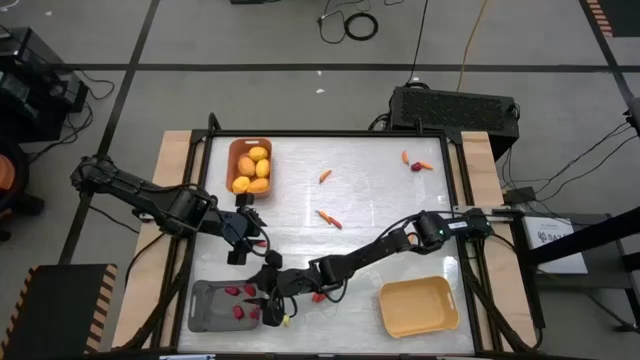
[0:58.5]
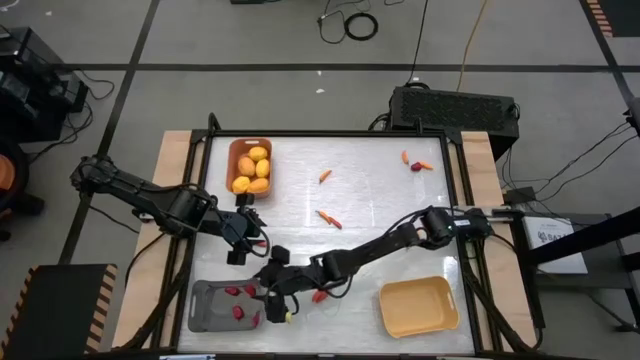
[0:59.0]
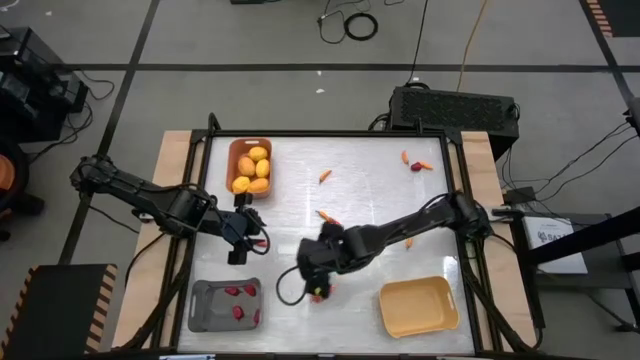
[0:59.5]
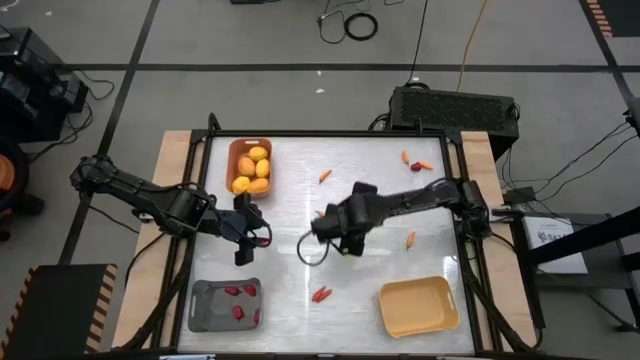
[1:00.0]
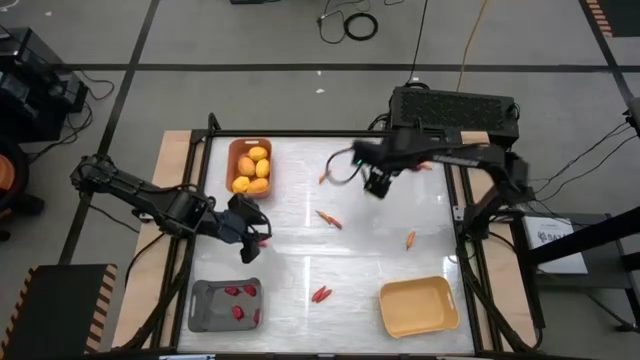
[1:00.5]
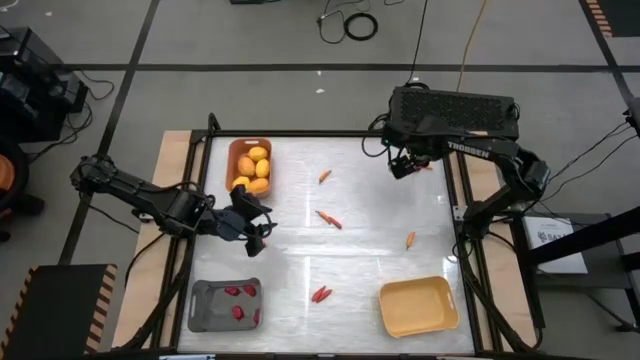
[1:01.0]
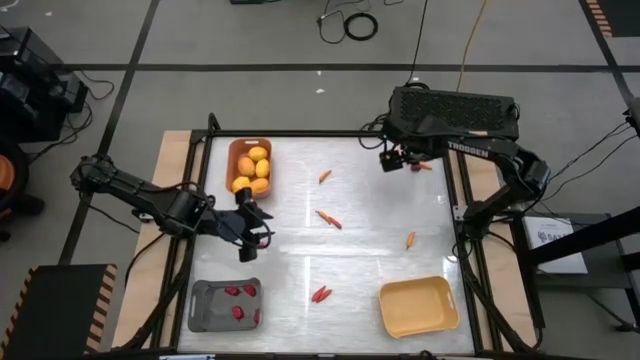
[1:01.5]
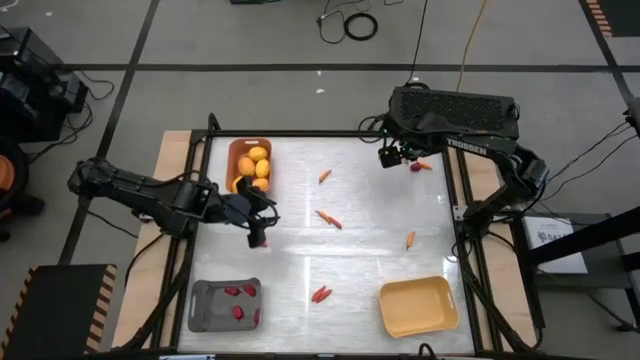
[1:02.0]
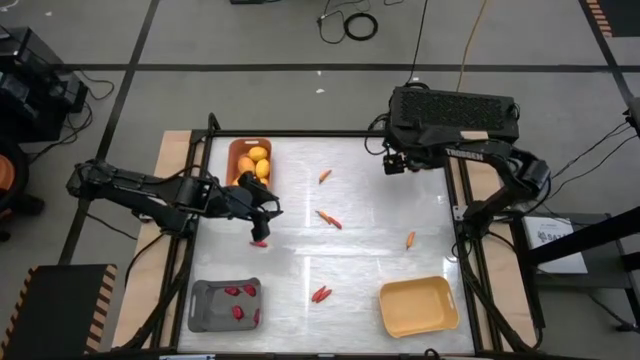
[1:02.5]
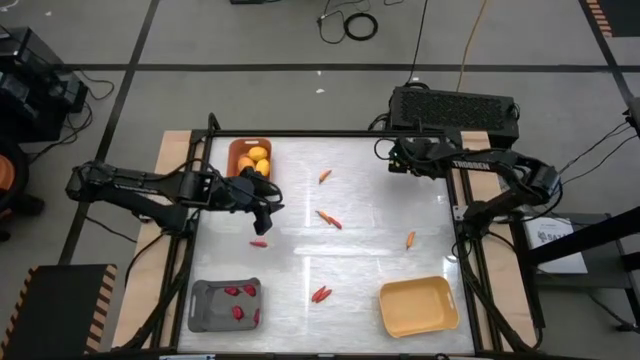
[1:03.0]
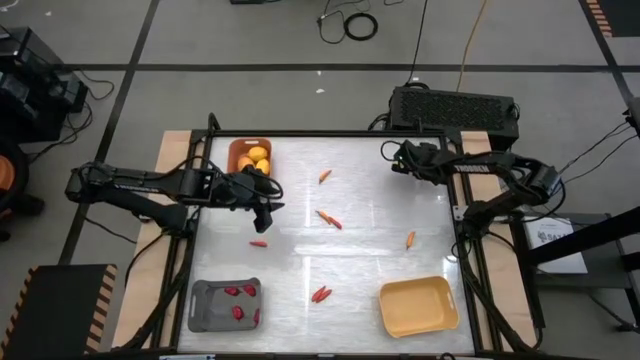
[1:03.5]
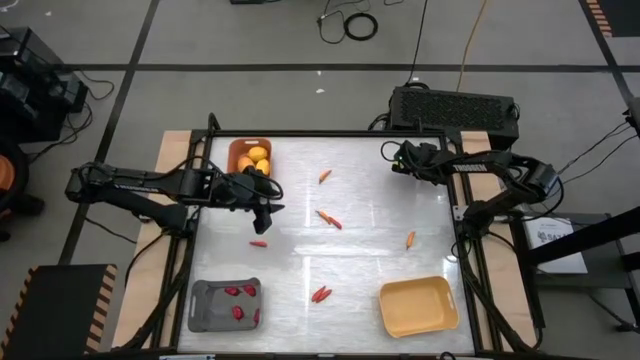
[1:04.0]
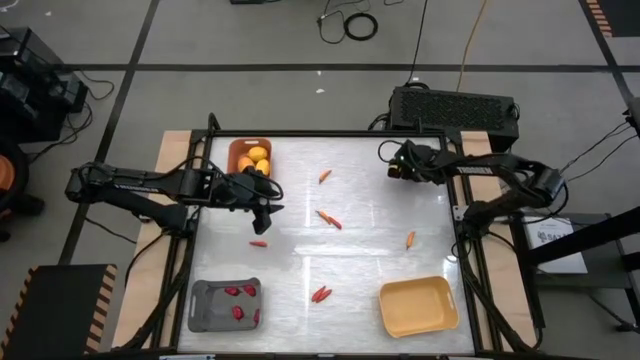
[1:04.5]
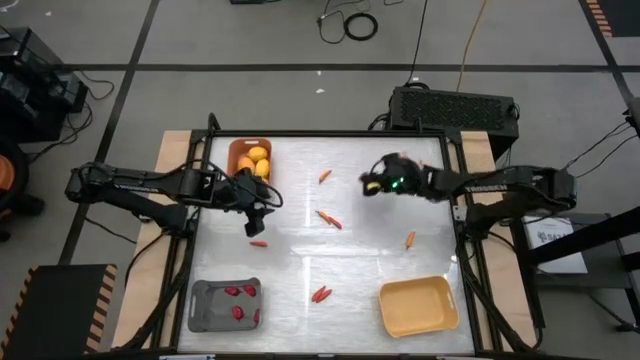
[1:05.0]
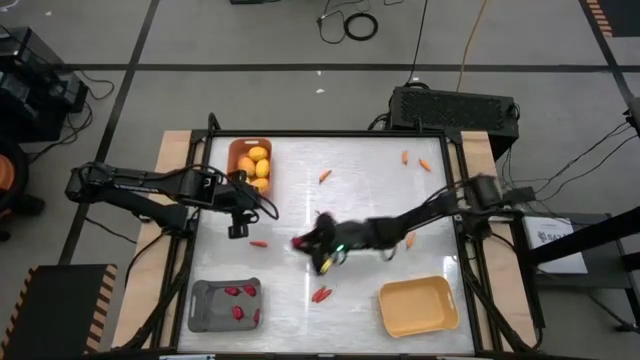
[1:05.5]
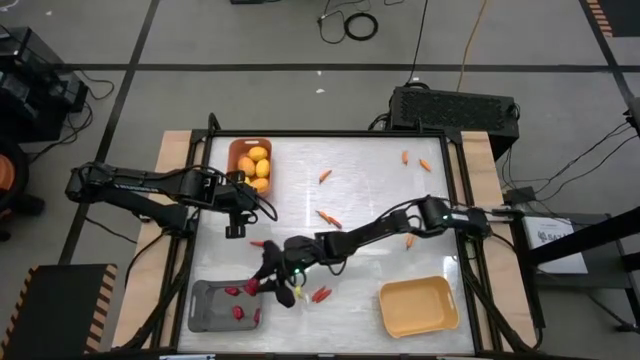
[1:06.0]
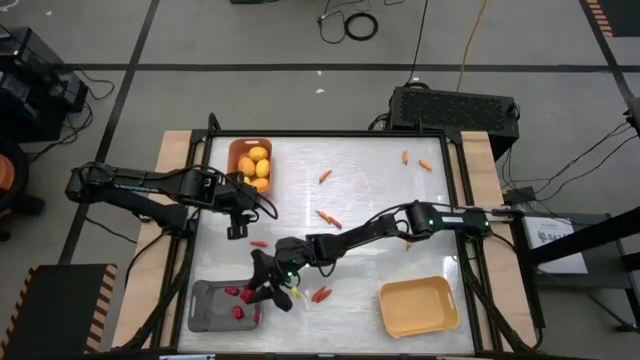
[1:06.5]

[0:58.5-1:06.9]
Task: Sort produce into baskets
Put the red bell pepper into the black bin

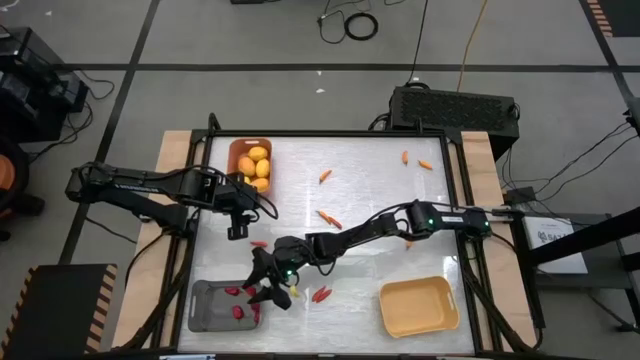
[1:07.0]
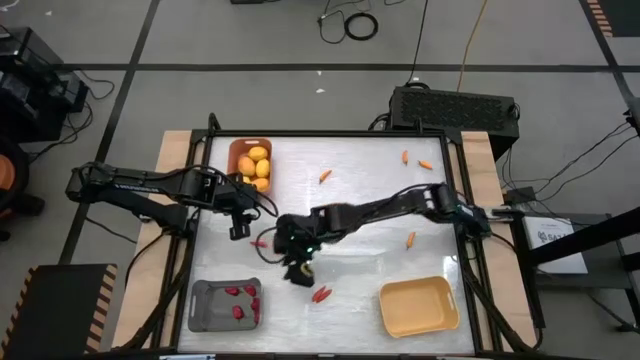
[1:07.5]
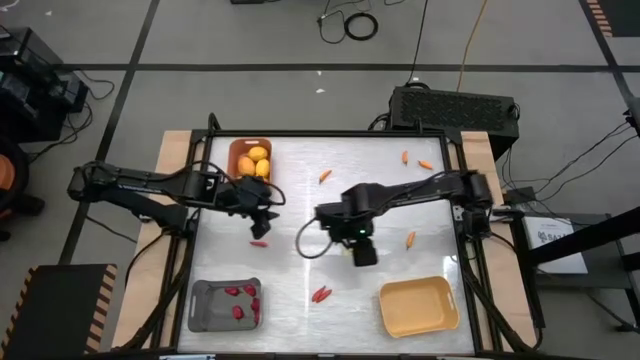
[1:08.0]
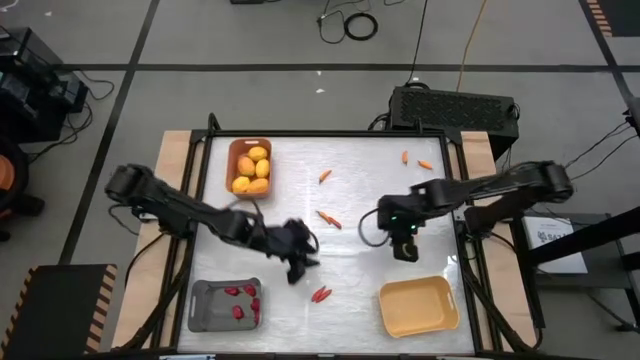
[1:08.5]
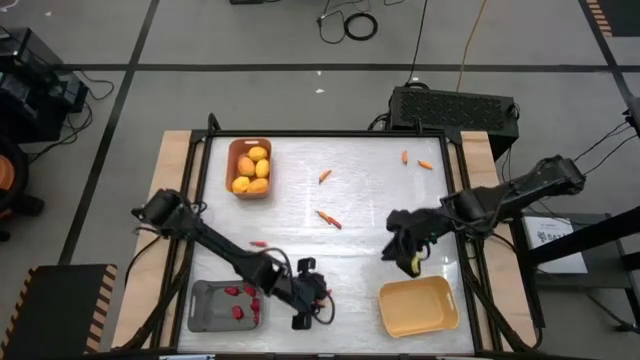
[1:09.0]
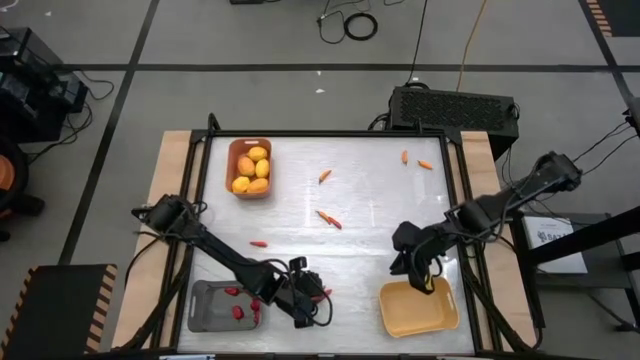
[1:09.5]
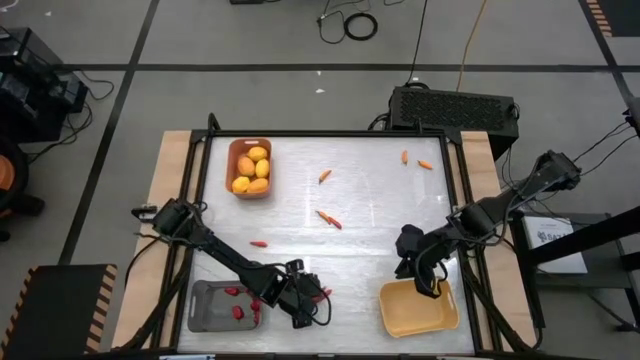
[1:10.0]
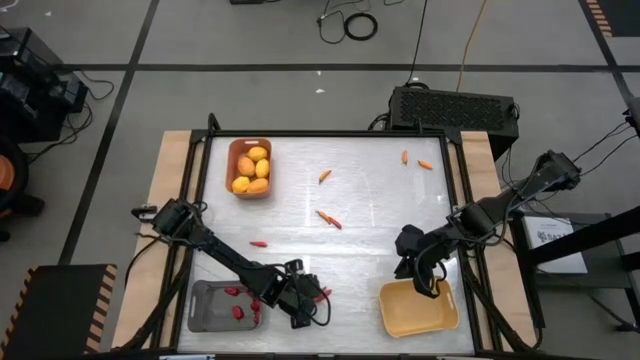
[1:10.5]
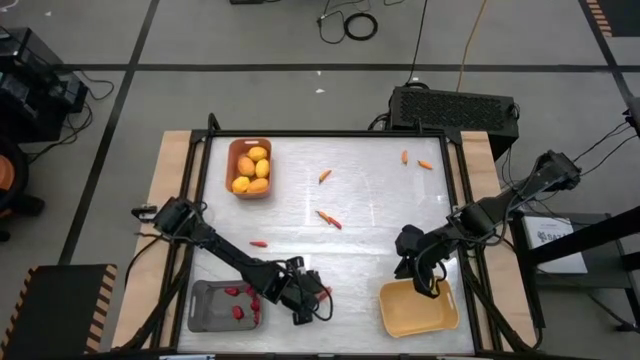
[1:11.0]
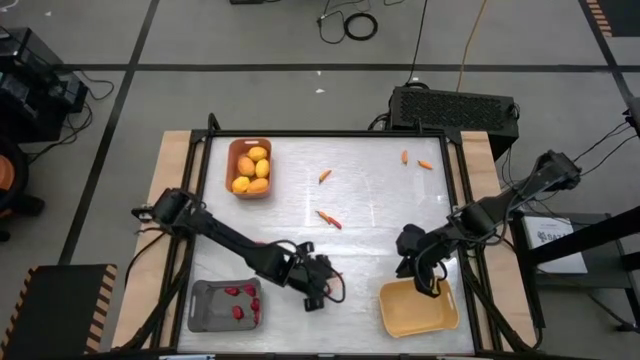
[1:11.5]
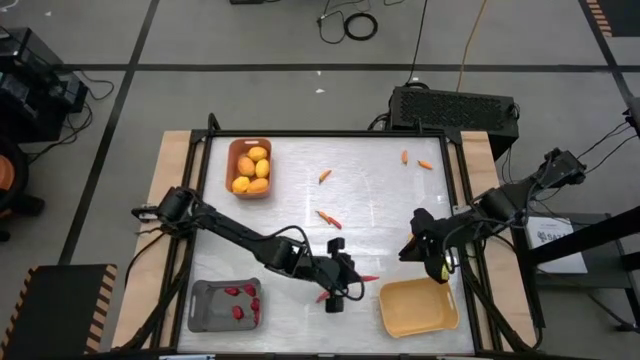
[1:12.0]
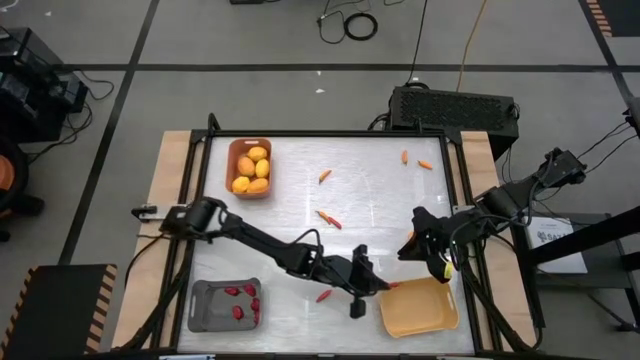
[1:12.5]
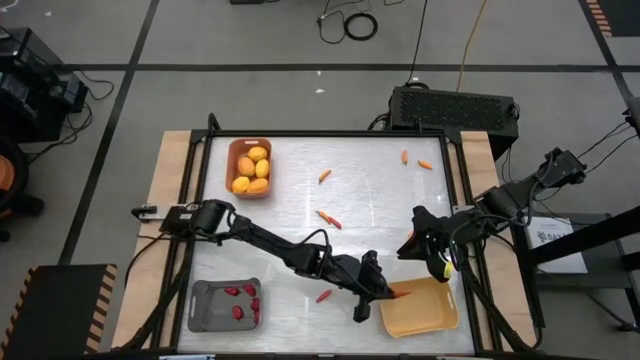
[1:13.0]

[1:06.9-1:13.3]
Put the red chili pepper into the yellow bin

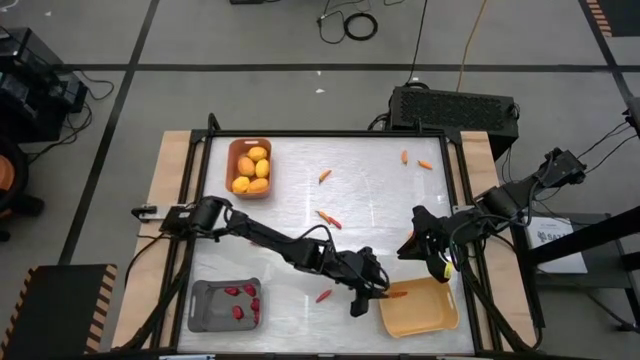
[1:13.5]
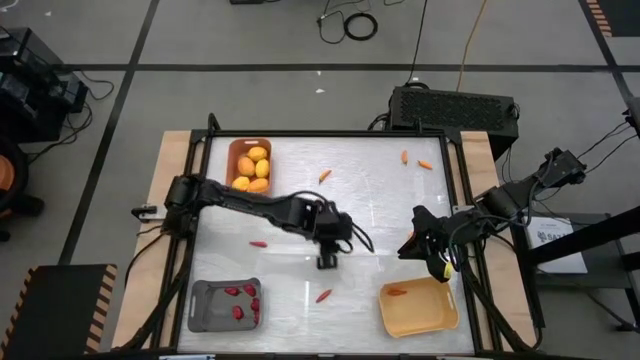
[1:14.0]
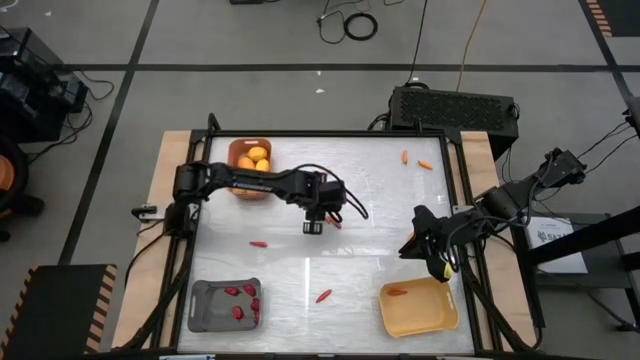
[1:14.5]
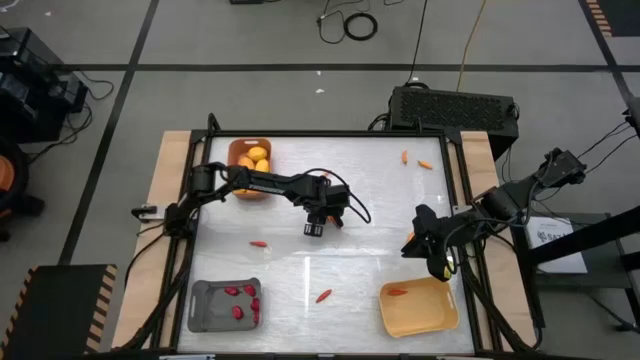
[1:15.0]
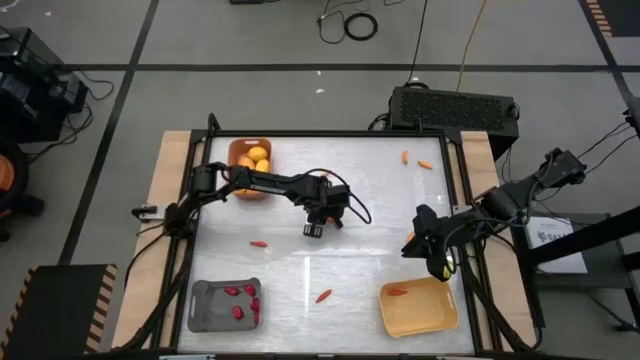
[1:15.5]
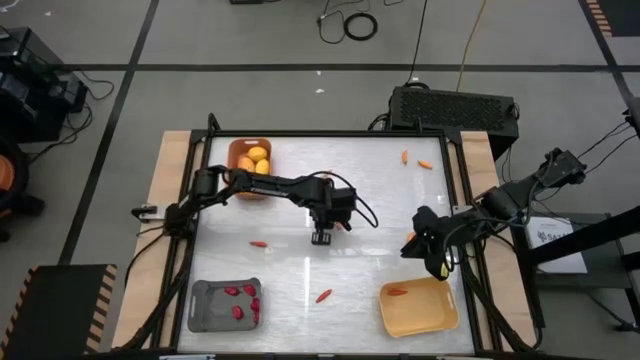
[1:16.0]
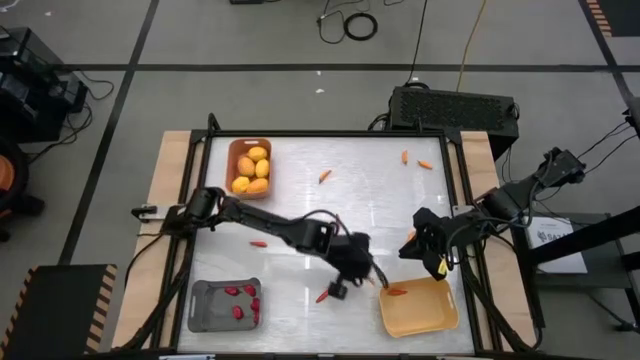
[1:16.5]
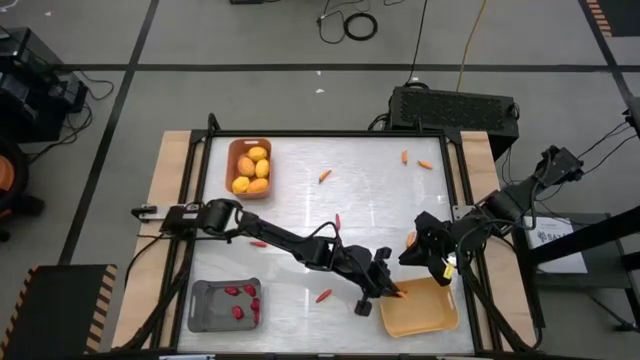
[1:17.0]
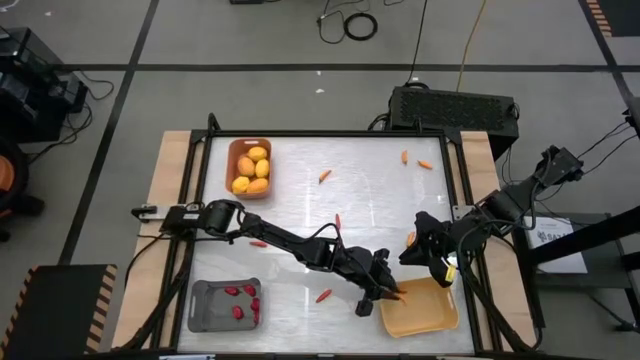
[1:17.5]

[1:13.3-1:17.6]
Put the orange chili pepper into the yellow bin

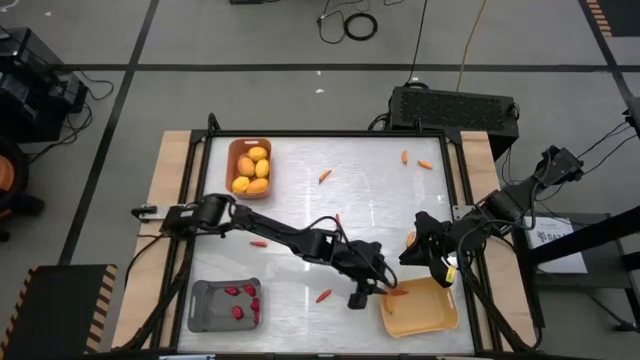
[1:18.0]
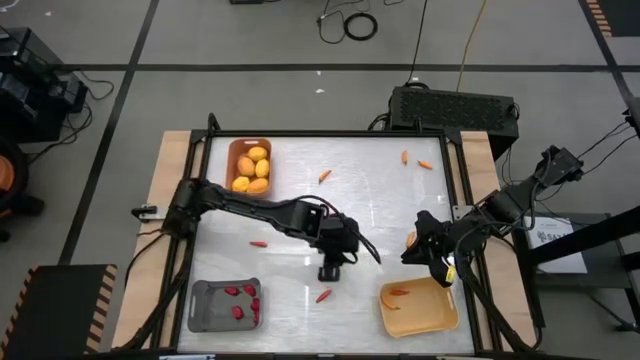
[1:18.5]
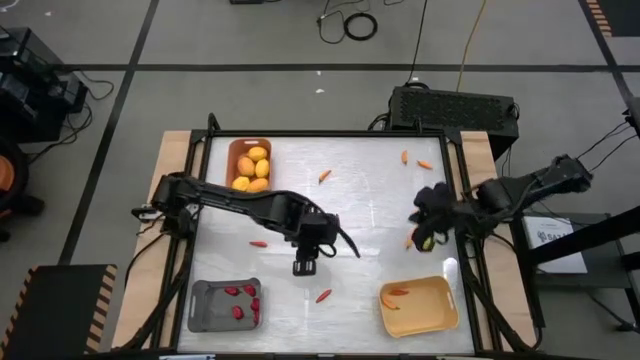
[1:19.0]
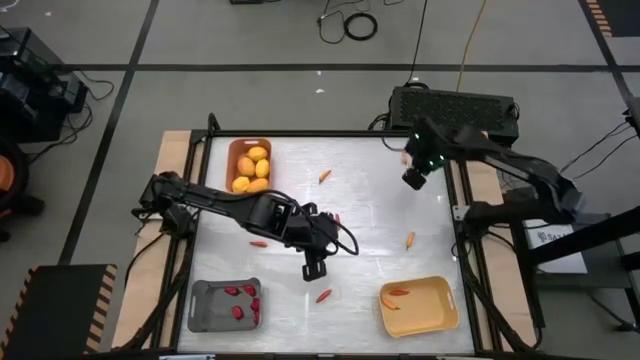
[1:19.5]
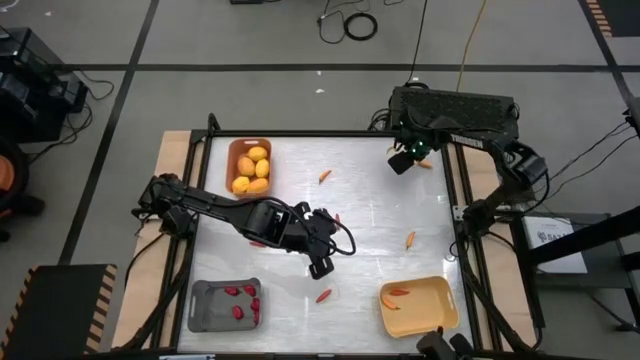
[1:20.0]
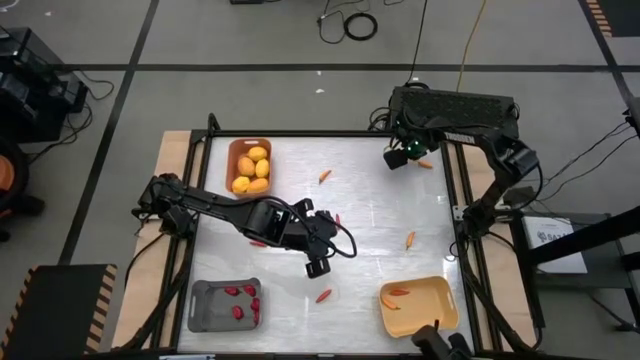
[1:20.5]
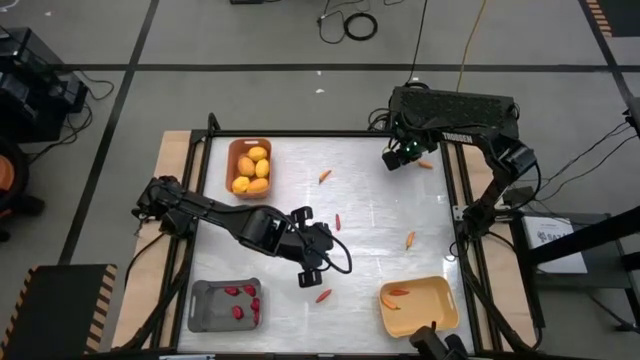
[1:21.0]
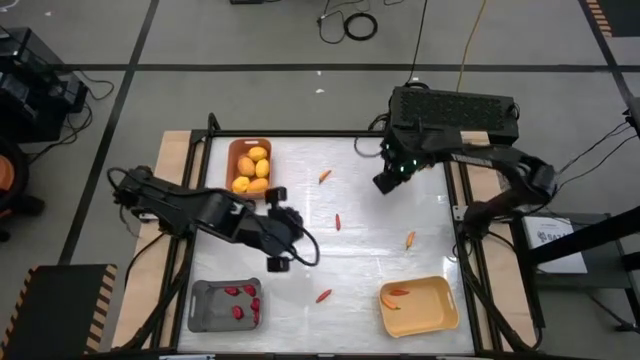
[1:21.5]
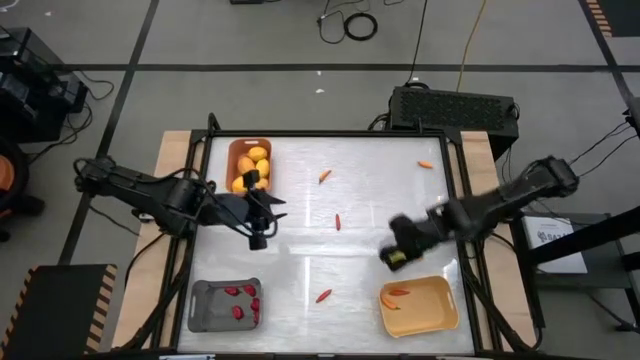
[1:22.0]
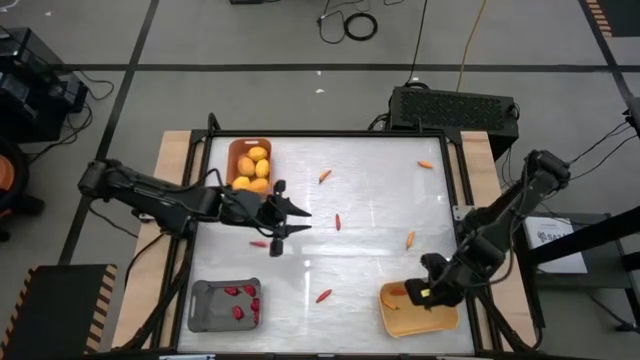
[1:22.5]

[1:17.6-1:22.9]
Put the orange chili pepper into the yellow bin
